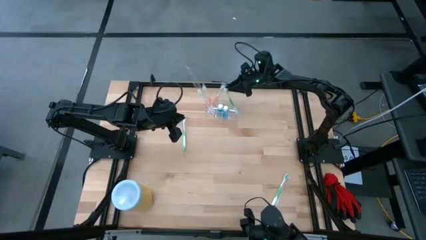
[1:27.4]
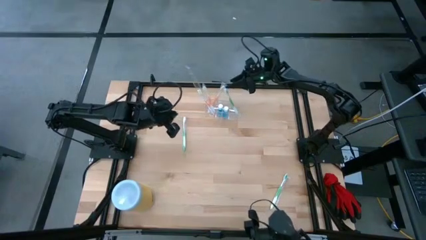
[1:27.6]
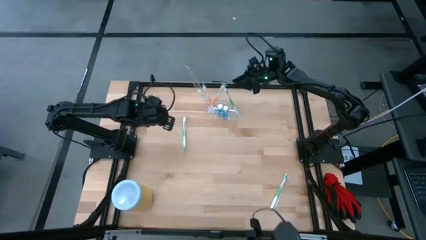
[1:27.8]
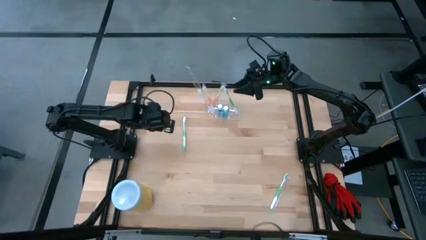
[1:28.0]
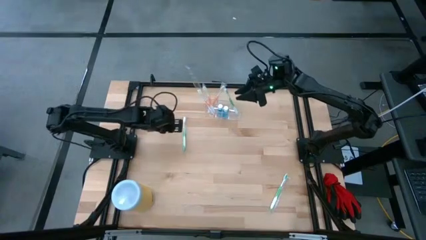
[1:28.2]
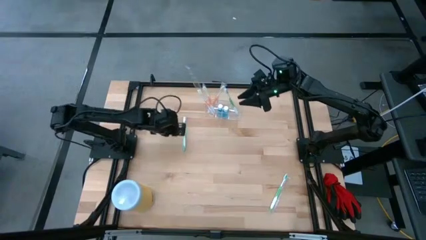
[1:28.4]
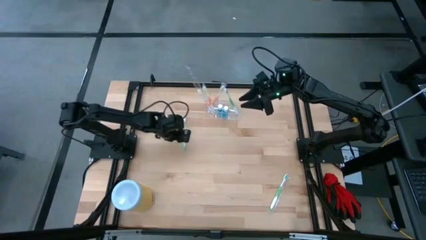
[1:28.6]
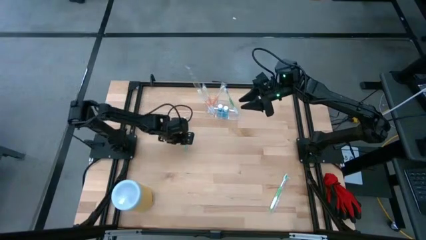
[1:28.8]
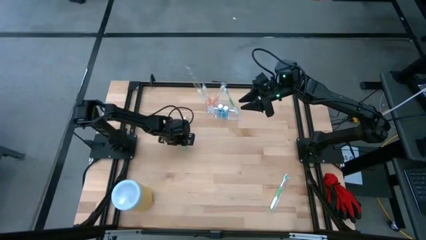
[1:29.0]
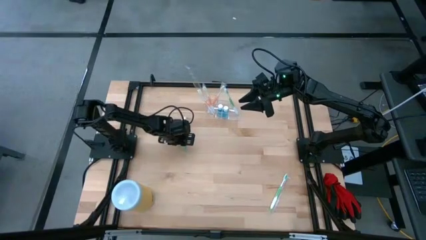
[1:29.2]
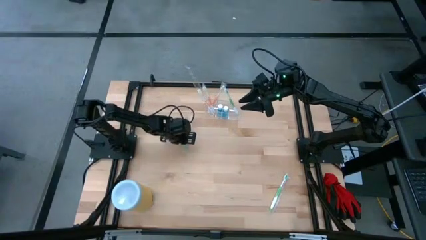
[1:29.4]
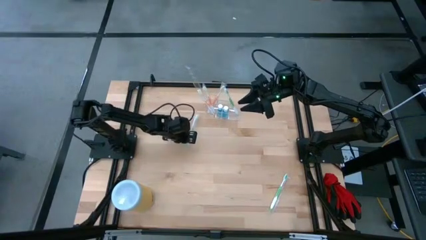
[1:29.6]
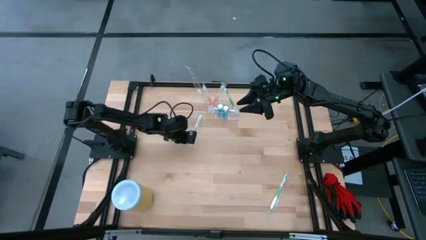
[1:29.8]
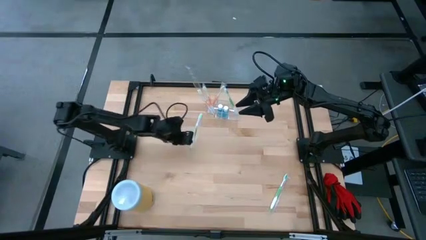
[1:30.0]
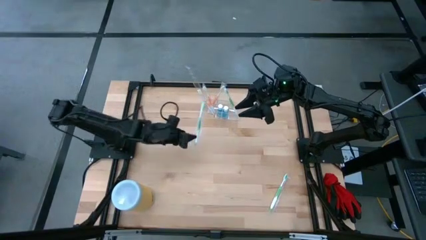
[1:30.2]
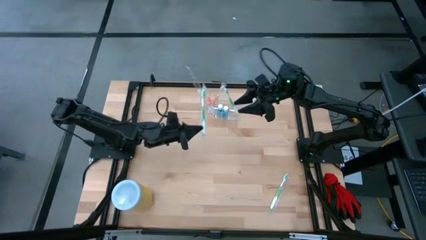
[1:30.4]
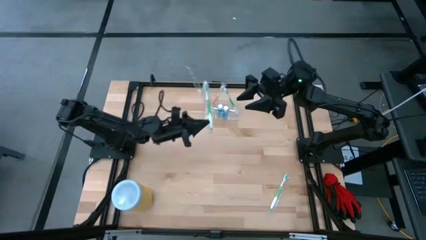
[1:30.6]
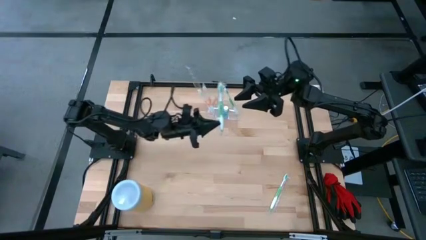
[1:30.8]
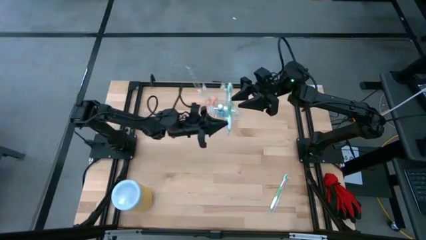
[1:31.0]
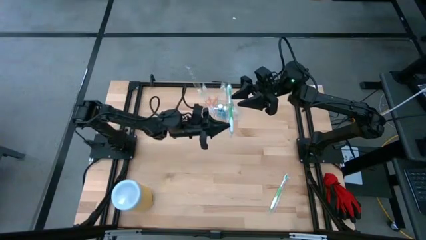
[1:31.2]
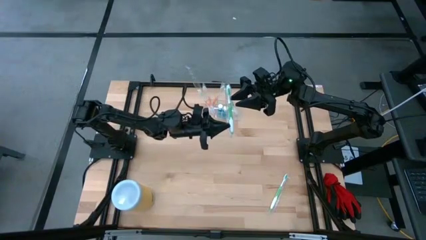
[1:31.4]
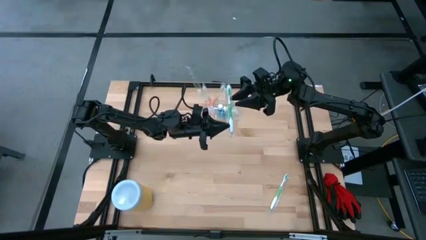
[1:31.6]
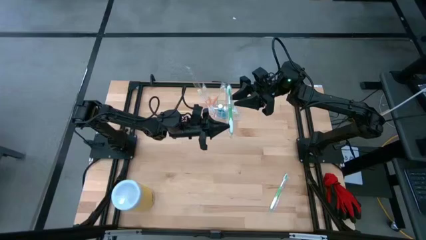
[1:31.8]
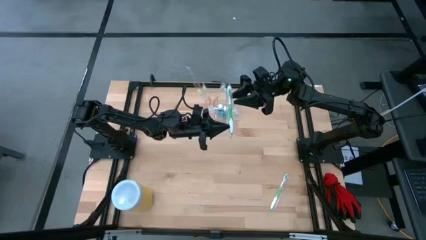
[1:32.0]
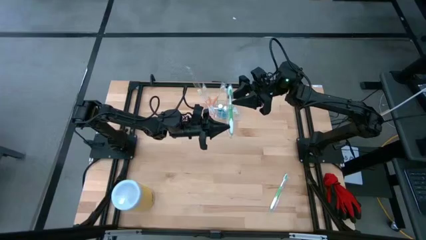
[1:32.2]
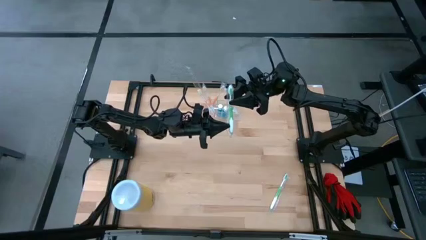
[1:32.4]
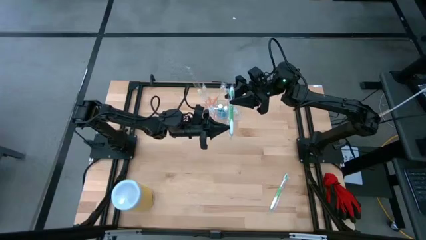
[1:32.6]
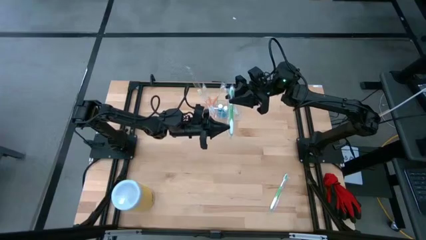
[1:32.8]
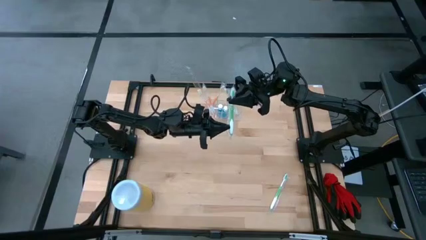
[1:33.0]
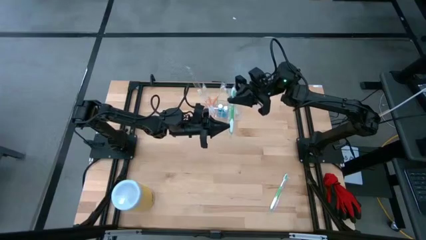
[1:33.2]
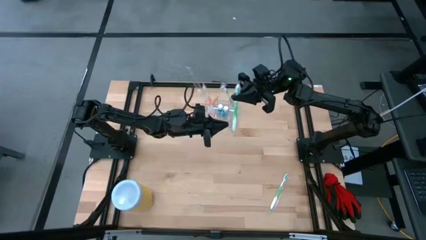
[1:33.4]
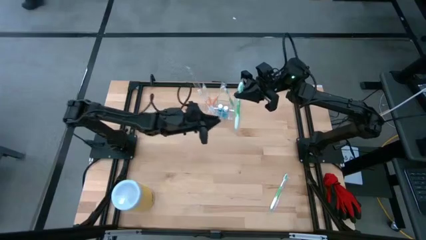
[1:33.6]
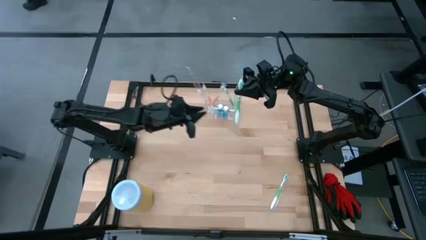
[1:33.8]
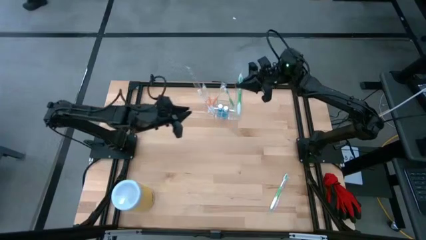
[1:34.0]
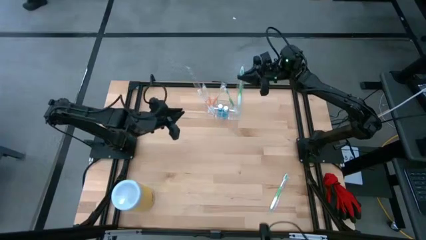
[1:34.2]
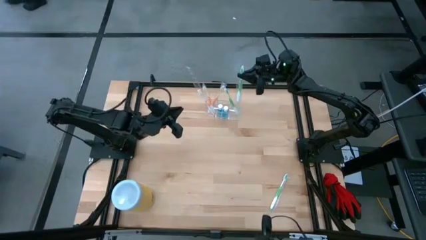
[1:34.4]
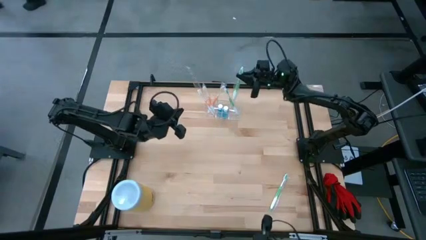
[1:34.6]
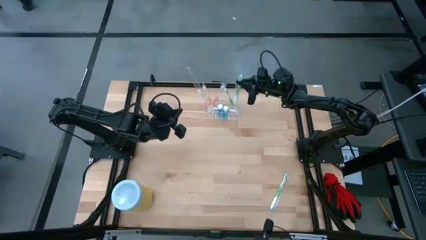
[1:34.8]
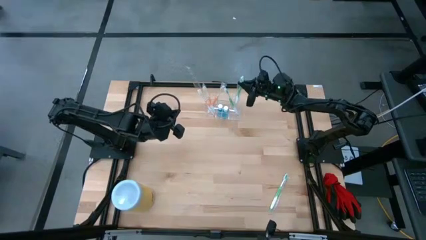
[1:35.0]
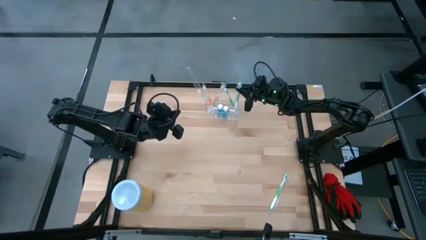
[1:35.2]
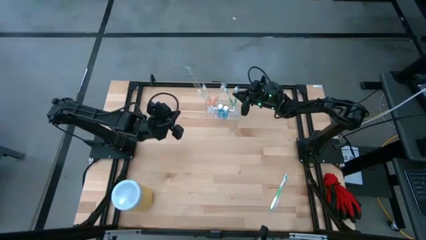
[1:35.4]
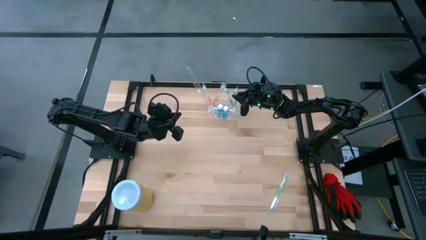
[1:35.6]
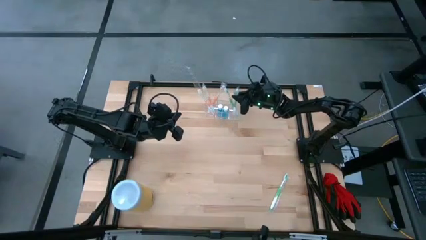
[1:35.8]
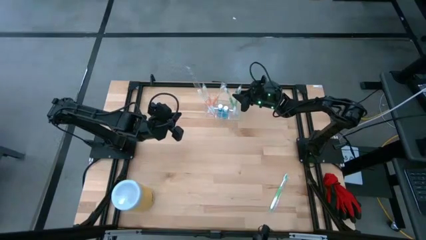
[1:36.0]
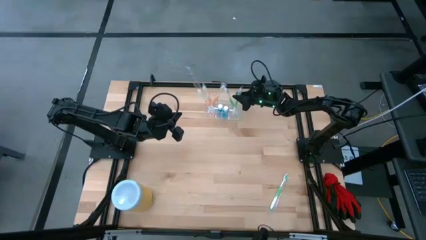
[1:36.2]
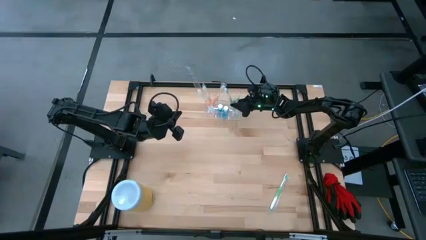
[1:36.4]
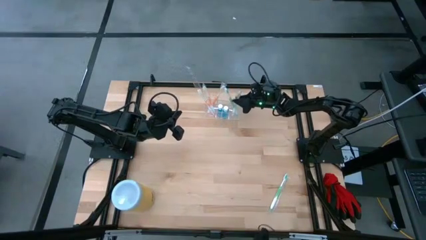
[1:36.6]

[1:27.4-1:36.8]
Task: Pick & Place toothbrushing station
Put the top green toothbrush into the transparent organizer

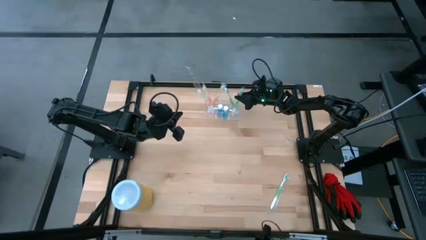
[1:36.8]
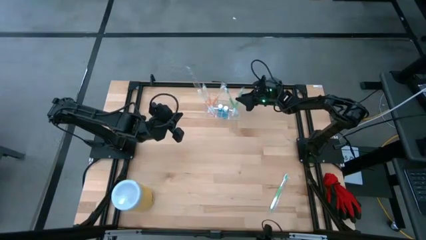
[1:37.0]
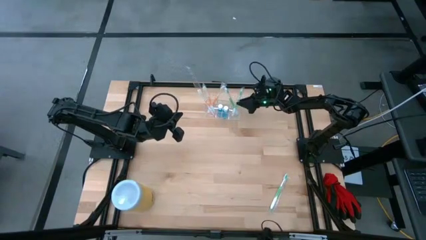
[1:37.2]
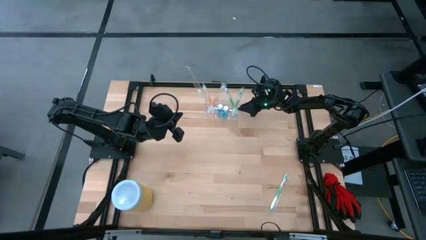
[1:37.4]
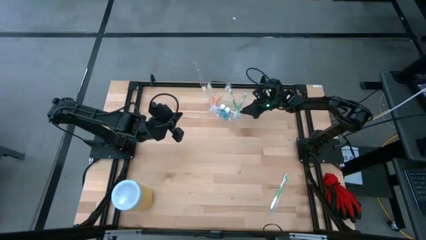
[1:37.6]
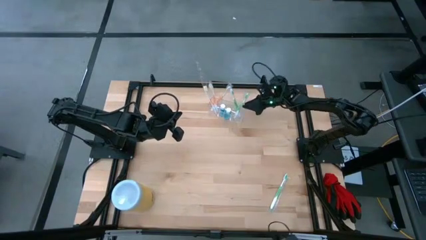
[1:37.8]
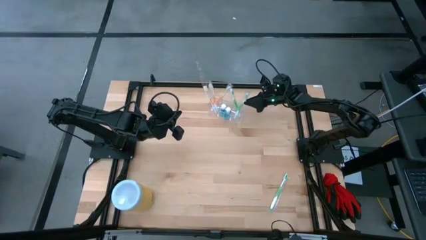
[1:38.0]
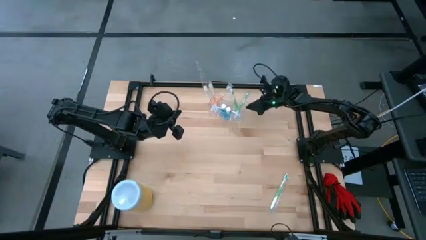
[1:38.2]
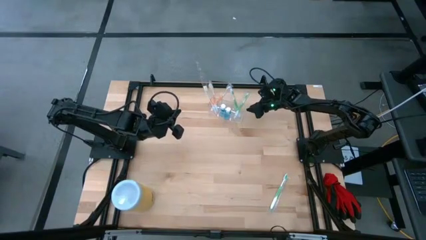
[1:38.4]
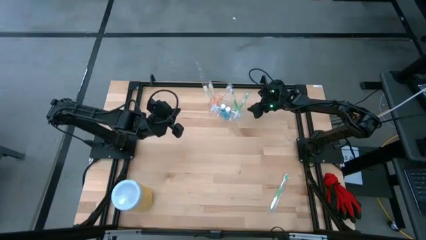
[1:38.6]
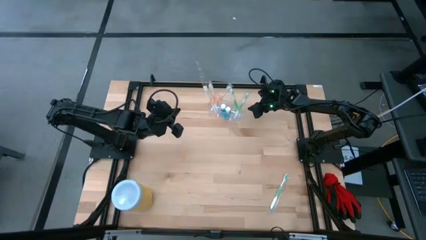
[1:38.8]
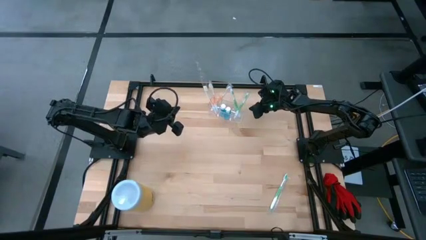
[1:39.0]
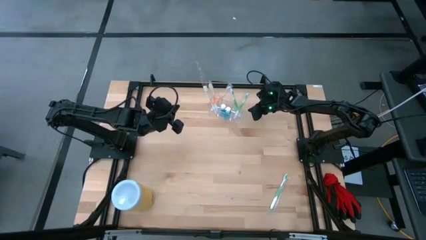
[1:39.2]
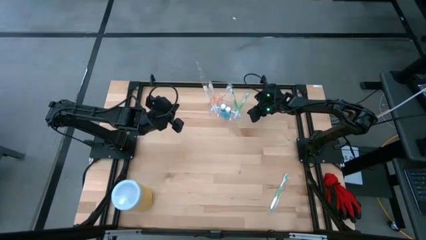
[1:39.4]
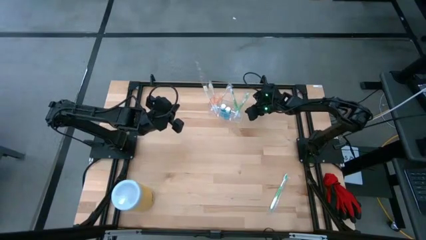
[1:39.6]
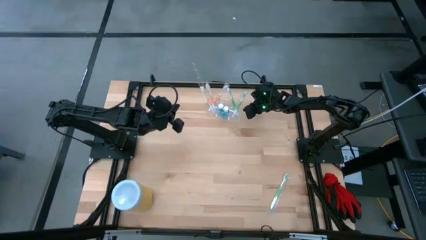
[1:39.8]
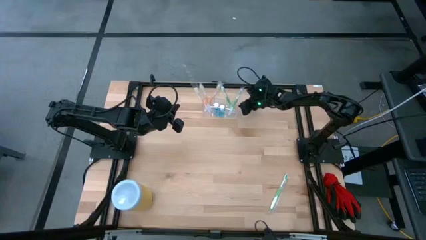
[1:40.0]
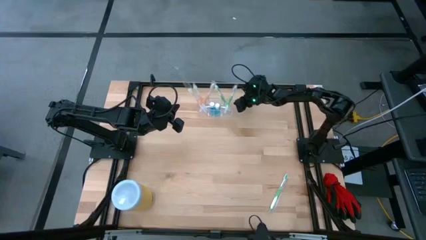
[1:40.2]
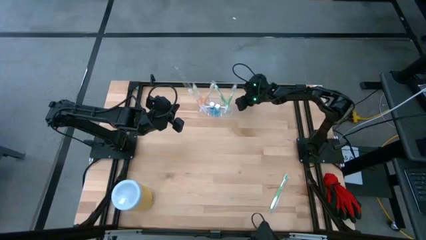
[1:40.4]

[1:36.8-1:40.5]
Adjust the transparent organizer
